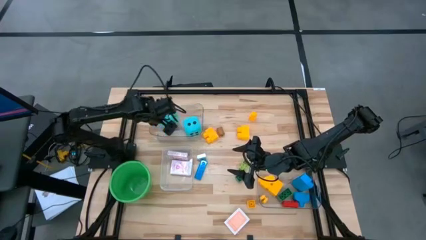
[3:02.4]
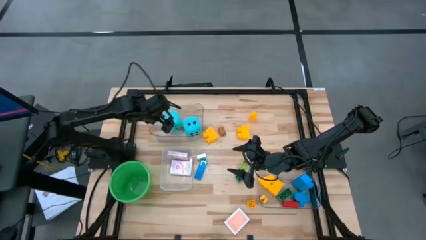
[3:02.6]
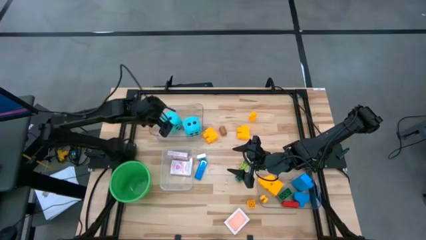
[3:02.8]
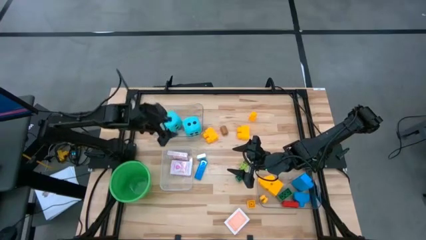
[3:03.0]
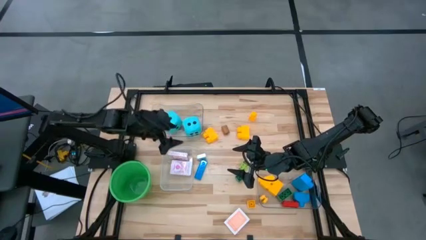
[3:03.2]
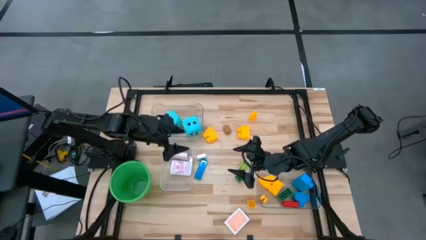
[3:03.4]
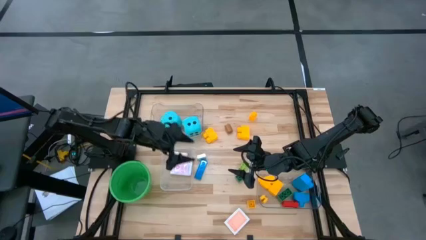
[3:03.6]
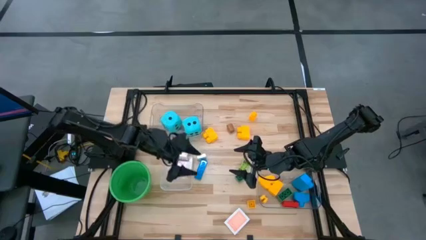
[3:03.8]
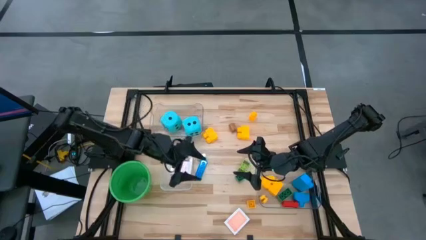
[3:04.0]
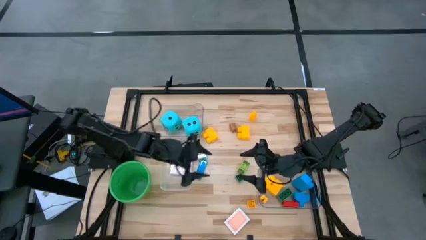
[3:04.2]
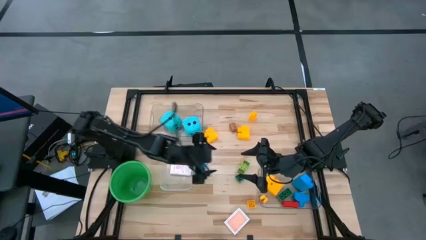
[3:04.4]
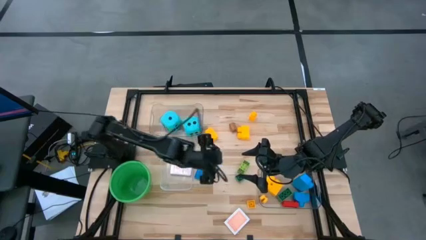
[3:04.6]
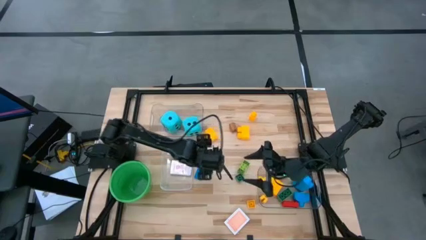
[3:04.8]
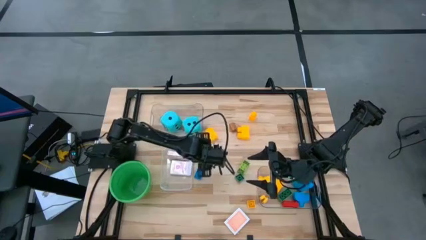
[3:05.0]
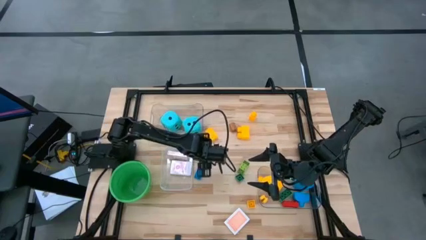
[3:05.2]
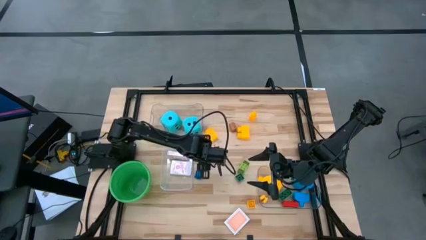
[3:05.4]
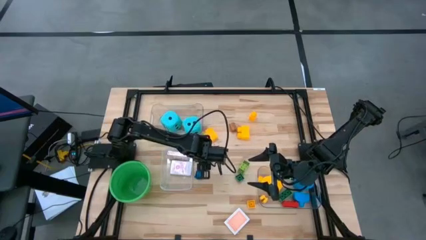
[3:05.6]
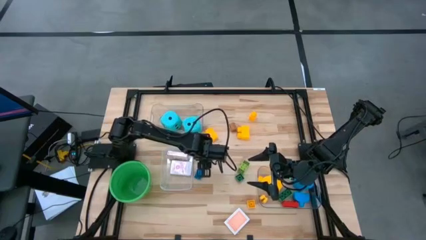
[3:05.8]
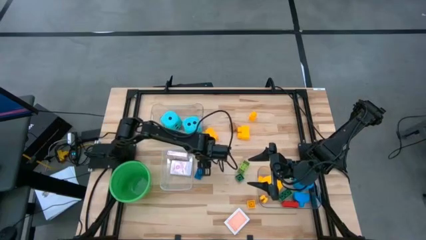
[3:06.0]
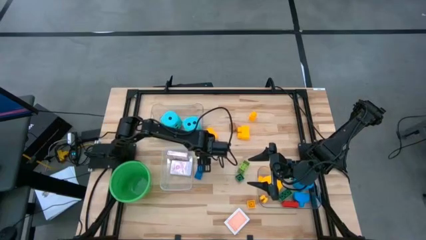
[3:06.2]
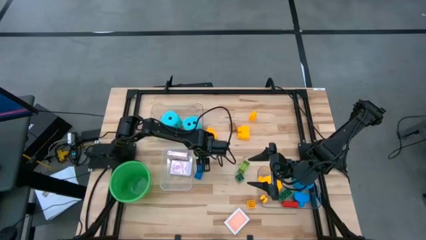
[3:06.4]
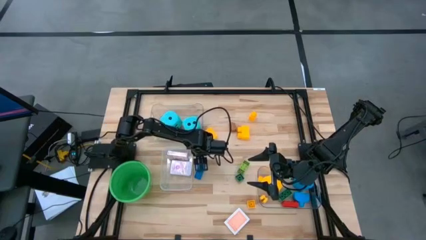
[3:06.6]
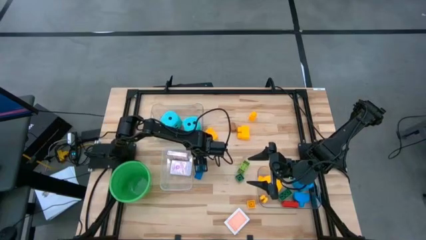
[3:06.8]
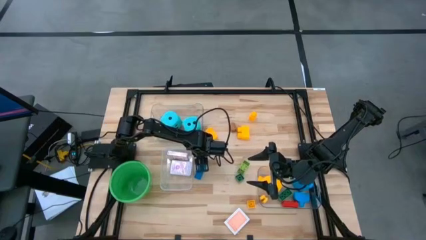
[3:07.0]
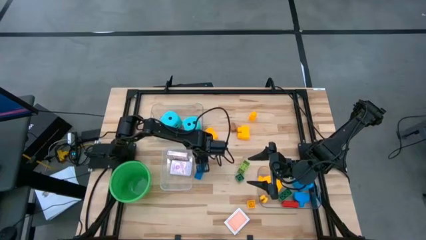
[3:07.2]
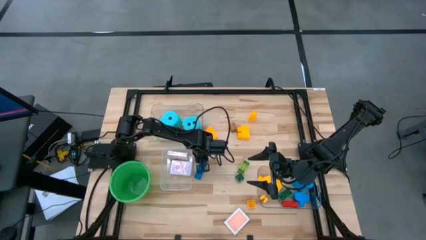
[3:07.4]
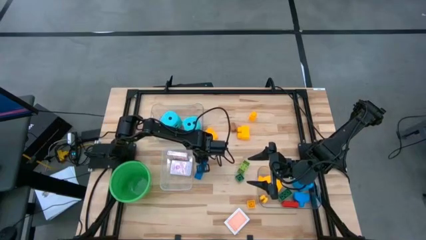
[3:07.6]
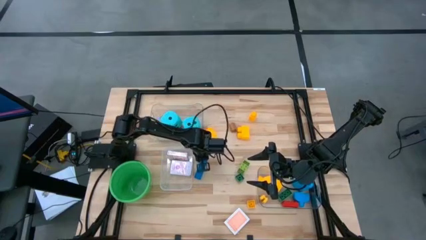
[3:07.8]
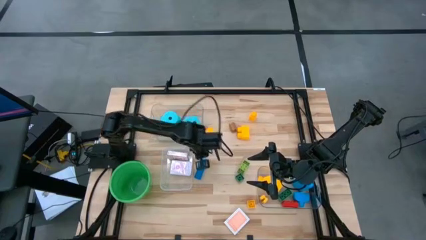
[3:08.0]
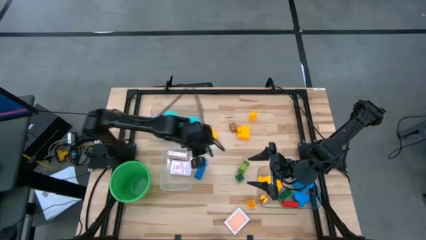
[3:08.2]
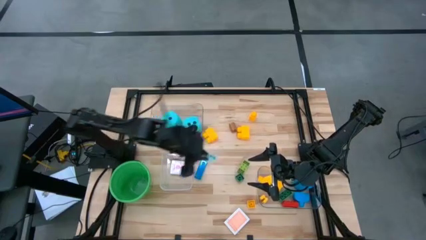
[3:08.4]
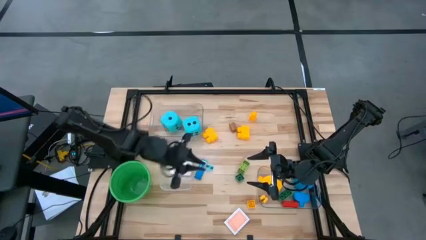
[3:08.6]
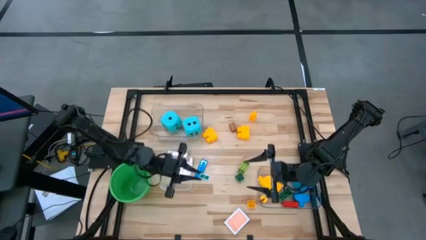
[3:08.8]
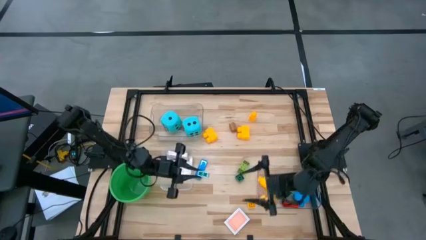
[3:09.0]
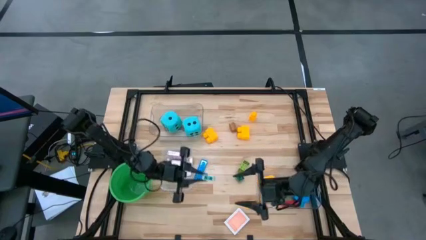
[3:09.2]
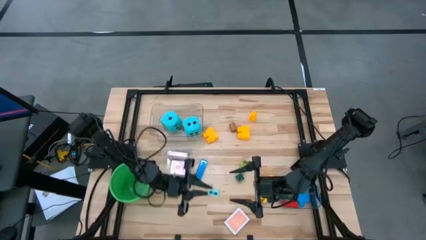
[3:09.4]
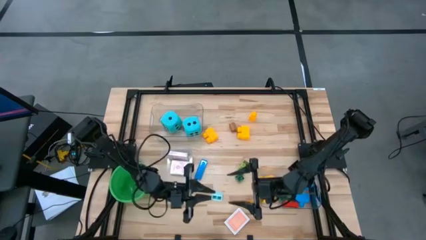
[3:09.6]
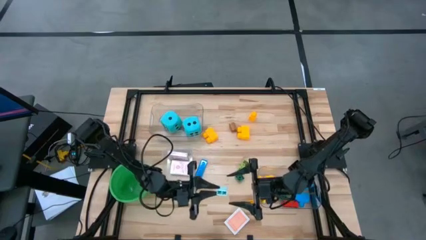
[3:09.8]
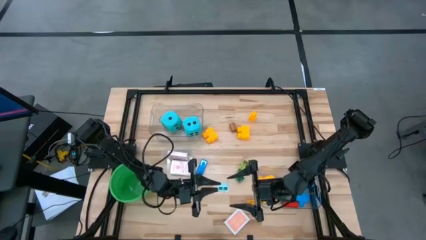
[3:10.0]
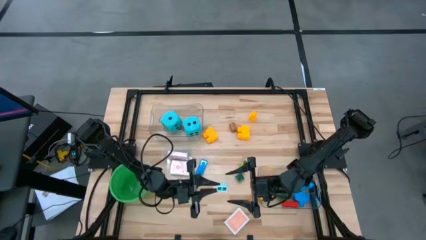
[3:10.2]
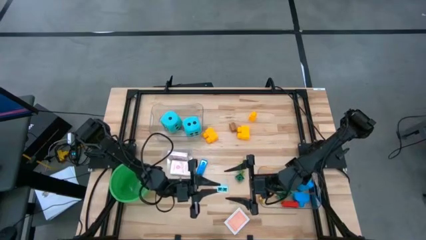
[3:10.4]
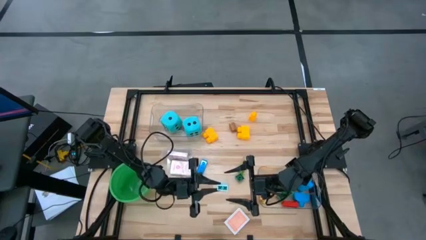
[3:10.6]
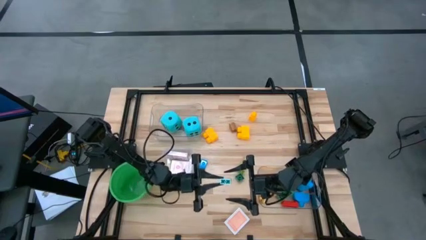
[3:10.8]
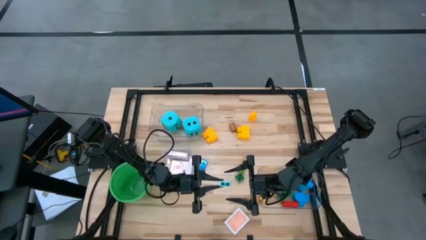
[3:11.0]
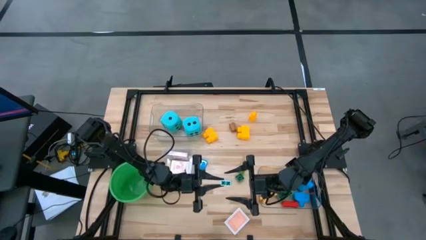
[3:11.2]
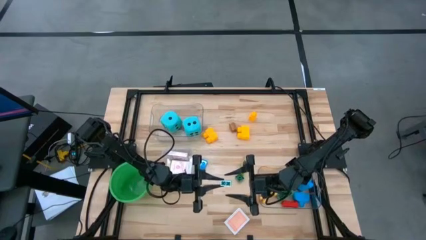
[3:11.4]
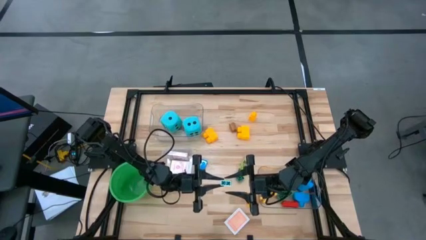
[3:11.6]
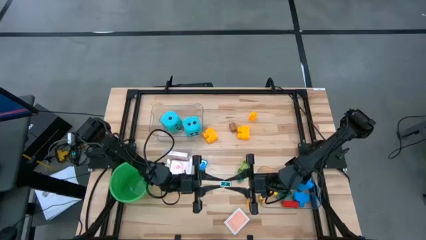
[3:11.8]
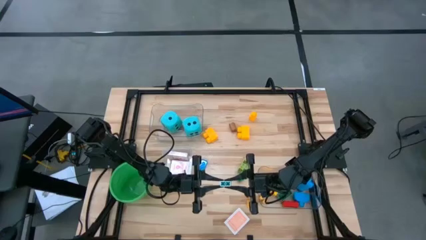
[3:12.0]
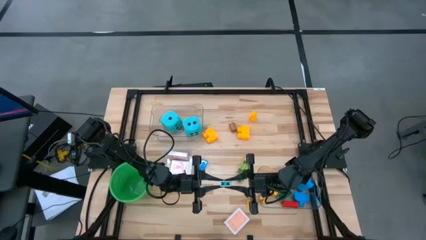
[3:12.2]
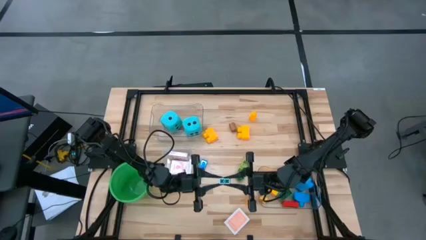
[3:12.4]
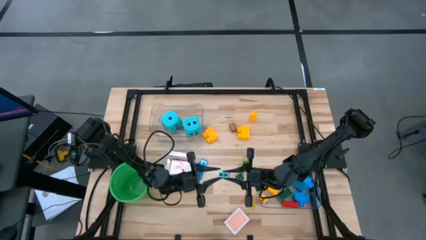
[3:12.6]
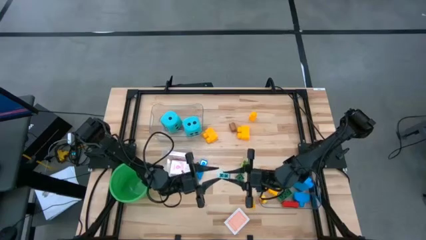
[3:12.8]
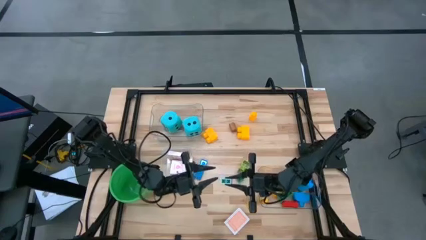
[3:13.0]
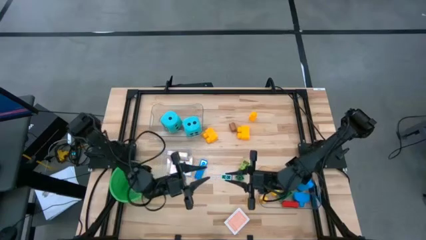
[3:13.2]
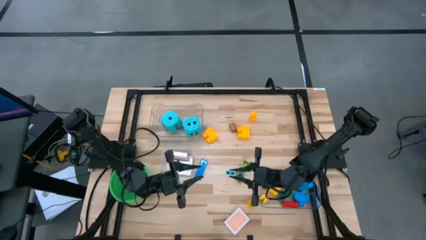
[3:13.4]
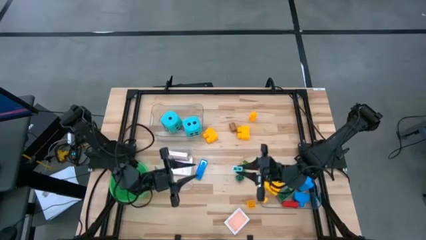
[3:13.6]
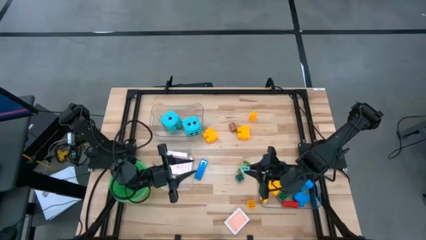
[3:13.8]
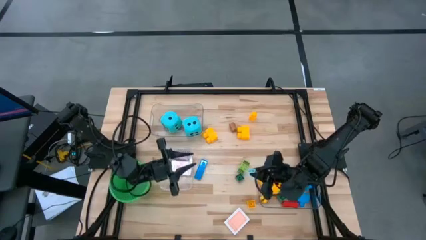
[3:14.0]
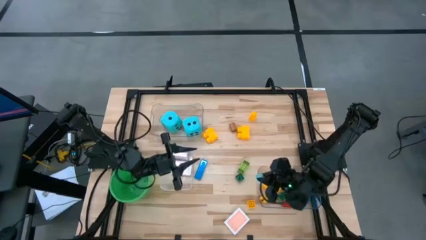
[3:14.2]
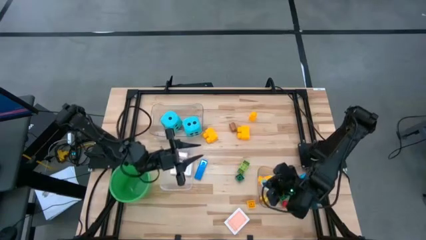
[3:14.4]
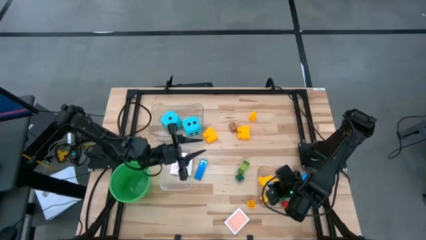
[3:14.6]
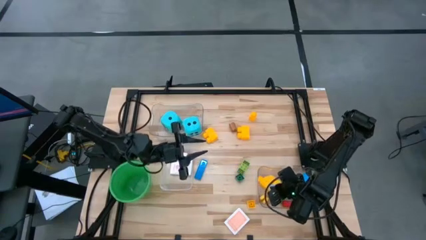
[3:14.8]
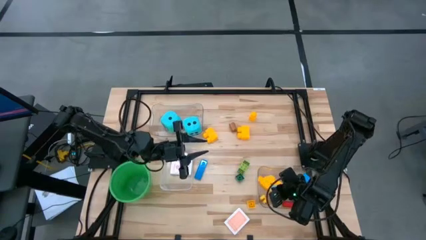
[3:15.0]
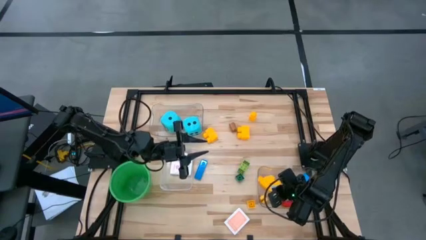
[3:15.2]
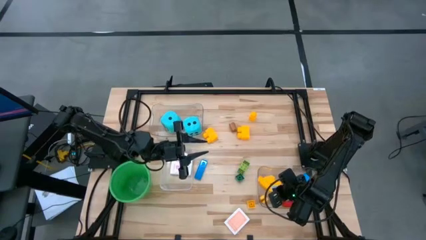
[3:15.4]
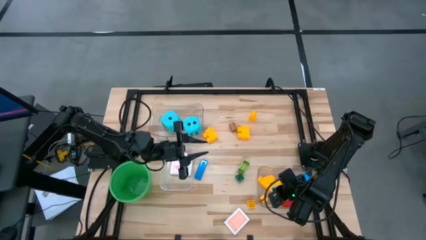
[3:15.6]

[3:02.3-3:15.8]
Task: Pick & Place Toys
Put the light blue game piece into the bottom right transparent bin

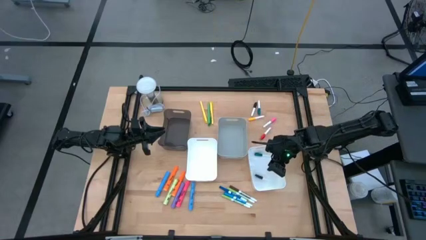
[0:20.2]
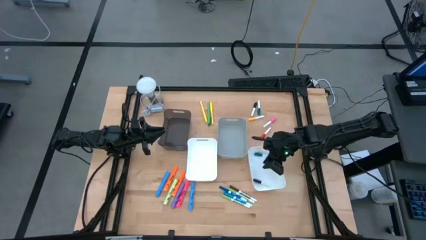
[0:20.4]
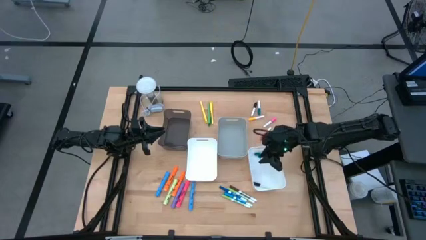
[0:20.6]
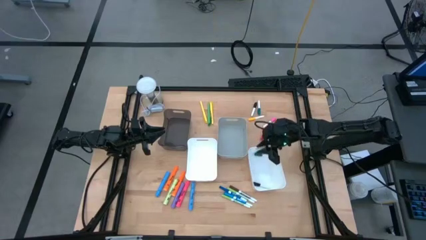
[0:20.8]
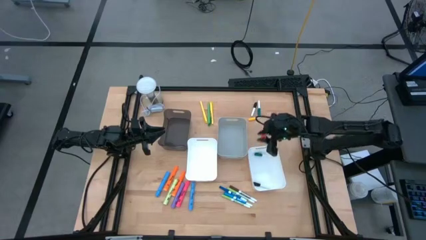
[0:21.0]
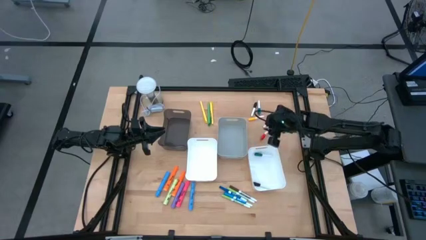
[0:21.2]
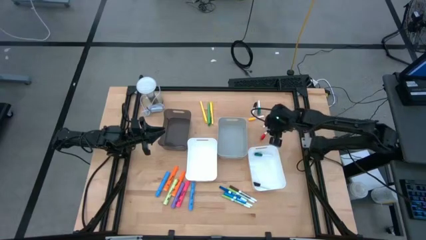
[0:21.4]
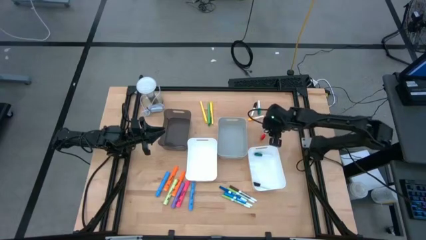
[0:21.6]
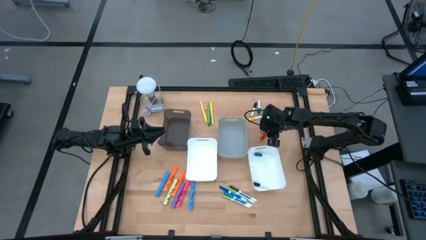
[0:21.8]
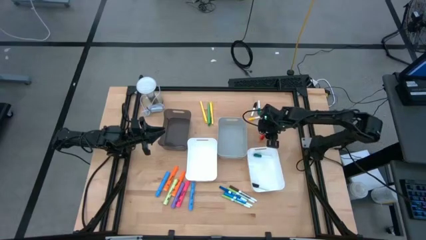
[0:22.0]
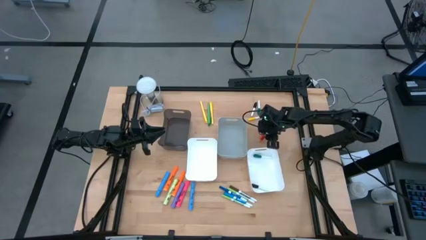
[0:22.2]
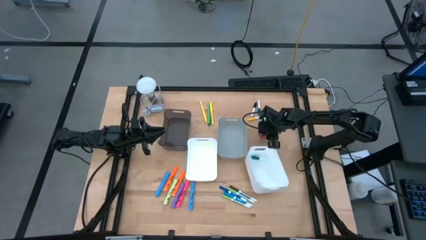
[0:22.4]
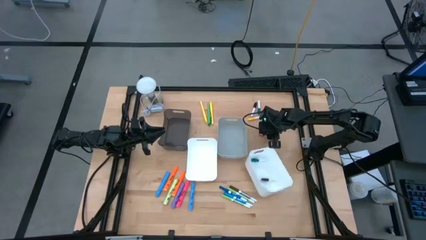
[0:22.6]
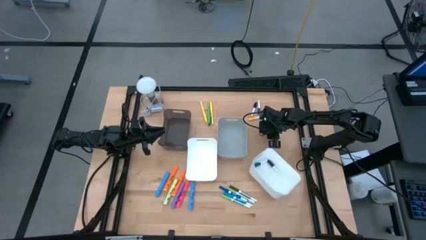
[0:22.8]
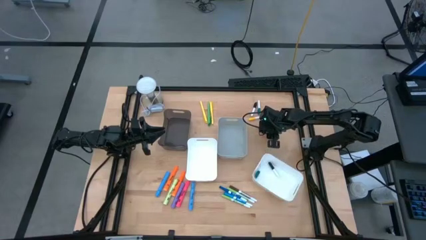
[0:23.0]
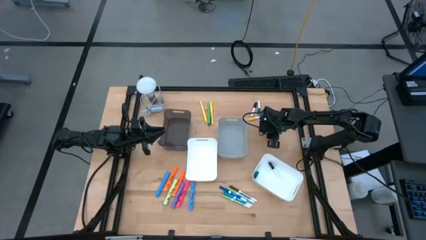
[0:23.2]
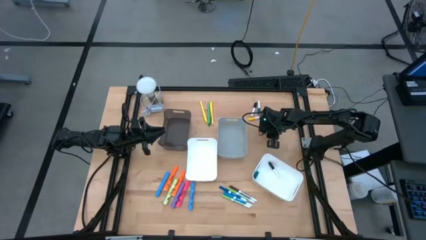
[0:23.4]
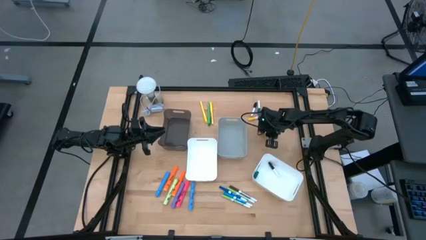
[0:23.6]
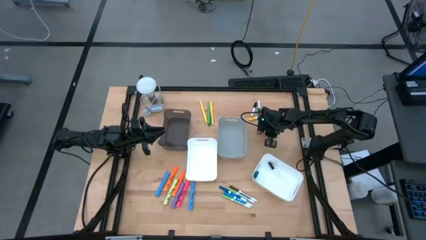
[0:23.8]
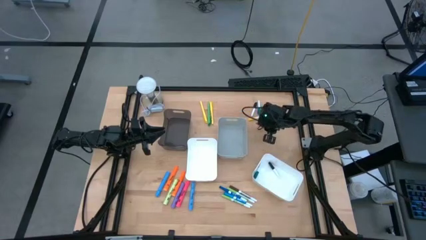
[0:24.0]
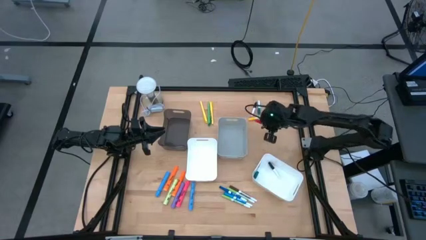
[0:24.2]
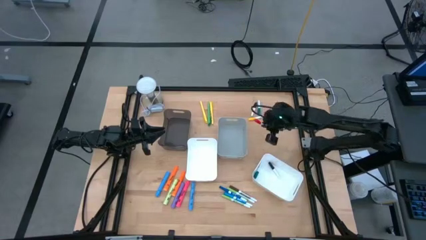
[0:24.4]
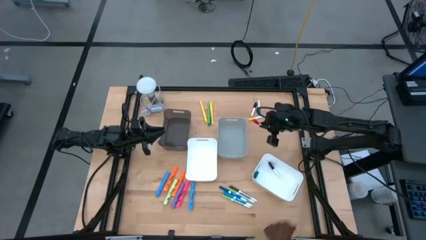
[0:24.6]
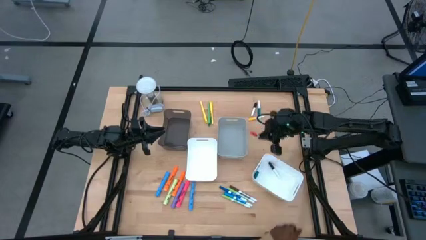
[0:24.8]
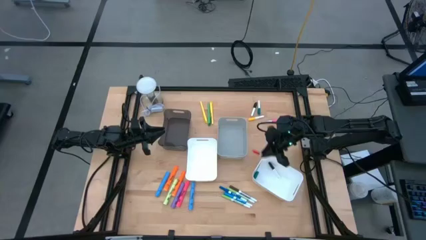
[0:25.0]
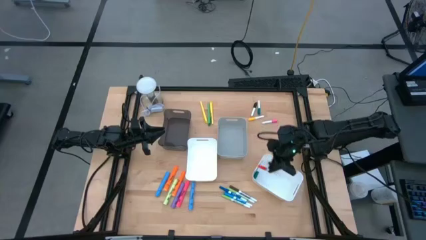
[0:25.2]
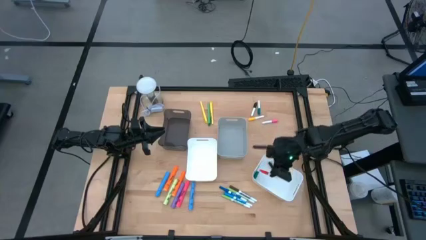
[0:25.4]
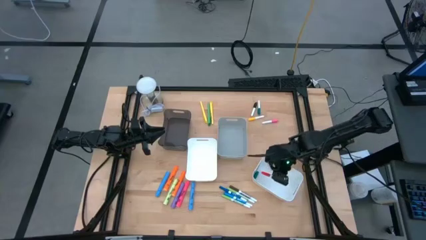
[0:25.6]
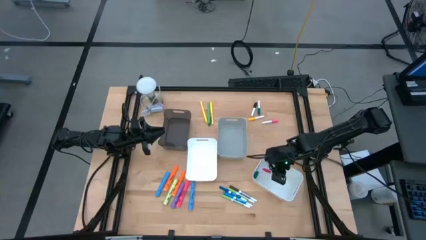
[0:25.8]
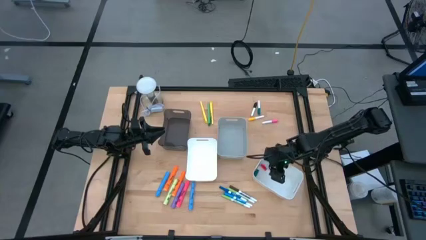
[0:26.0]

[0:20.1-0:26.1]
Task: Pick & Place Markers
Put the orange mini marker into the right white bin
